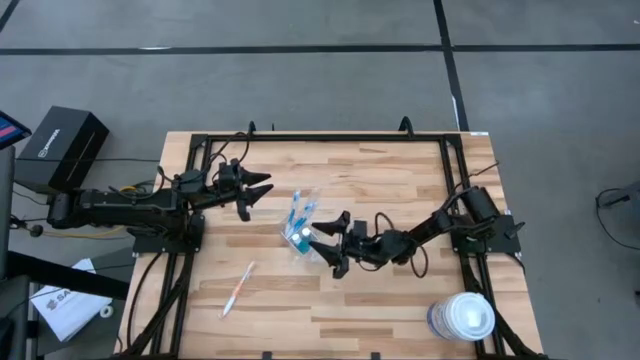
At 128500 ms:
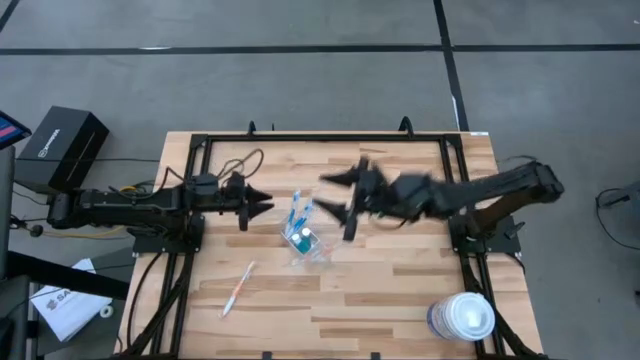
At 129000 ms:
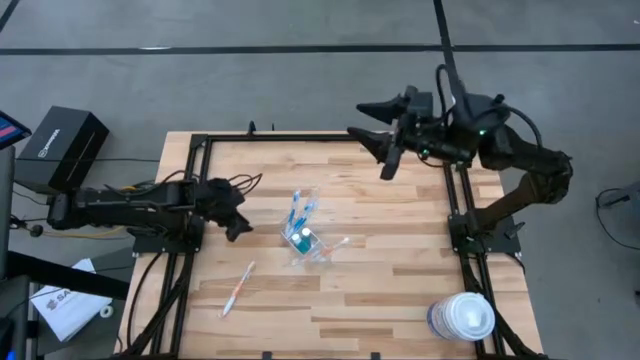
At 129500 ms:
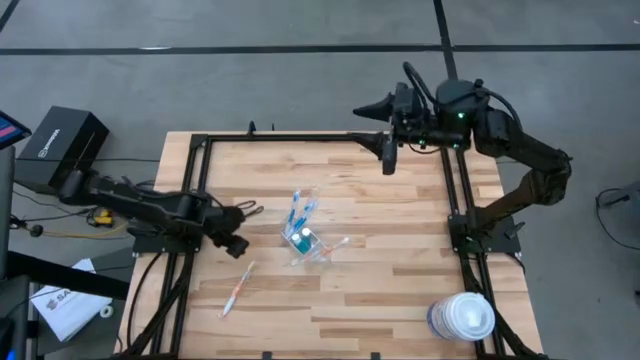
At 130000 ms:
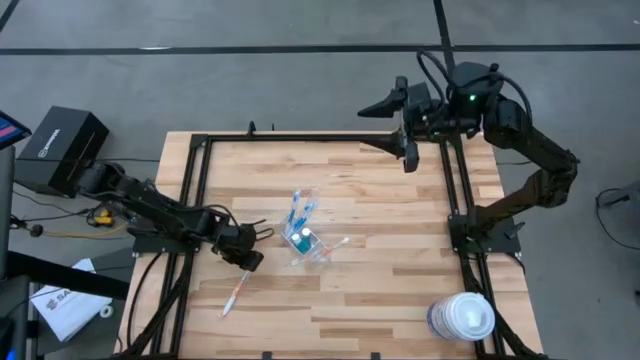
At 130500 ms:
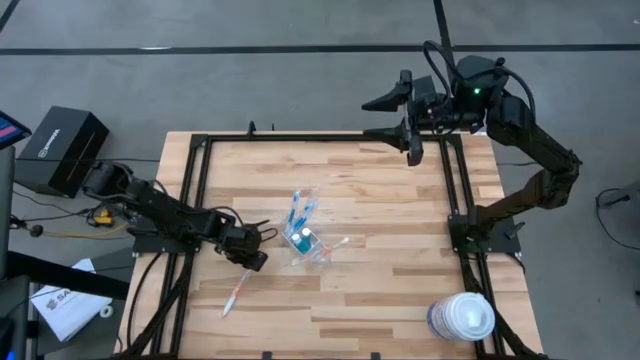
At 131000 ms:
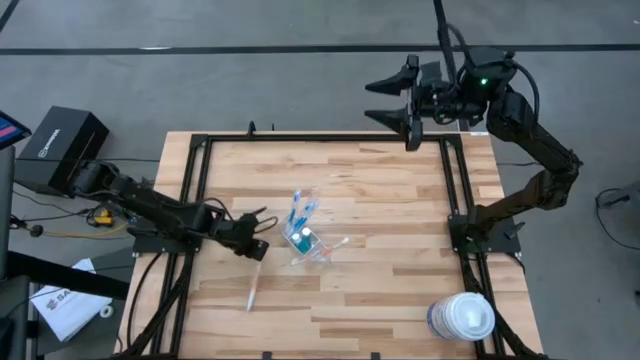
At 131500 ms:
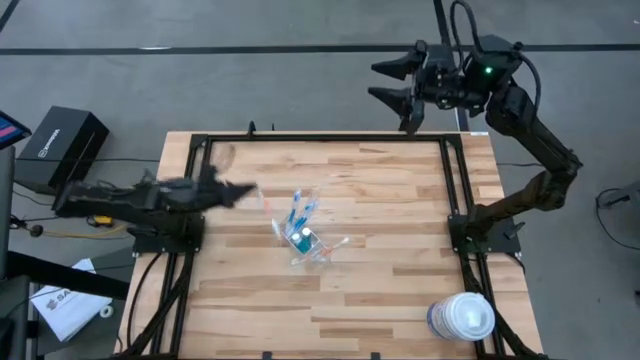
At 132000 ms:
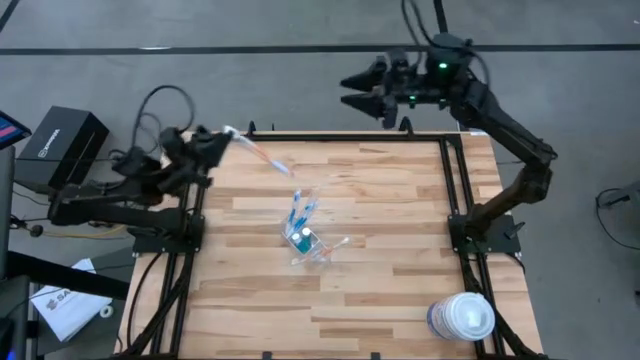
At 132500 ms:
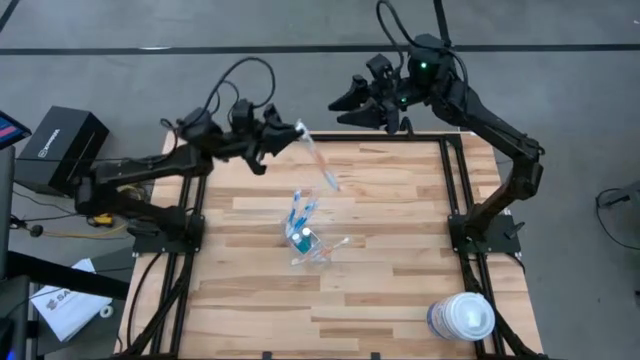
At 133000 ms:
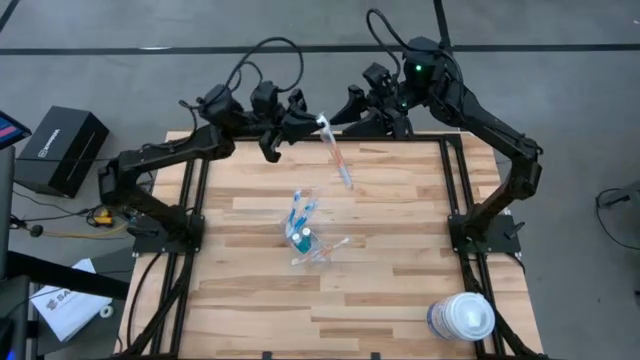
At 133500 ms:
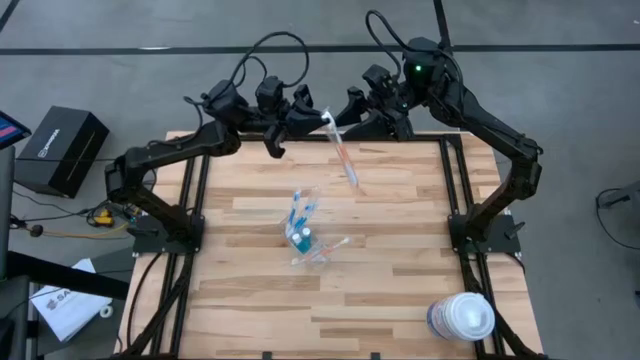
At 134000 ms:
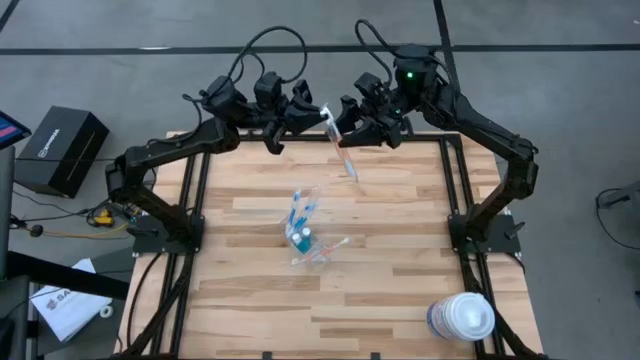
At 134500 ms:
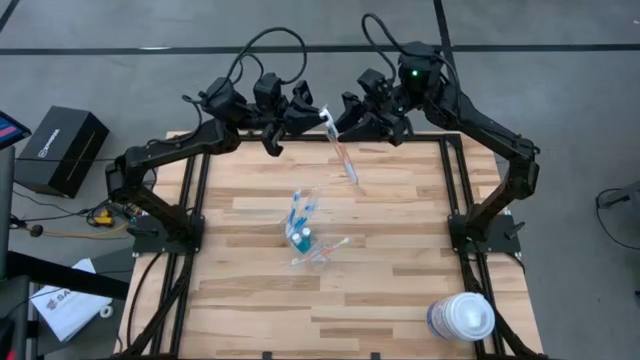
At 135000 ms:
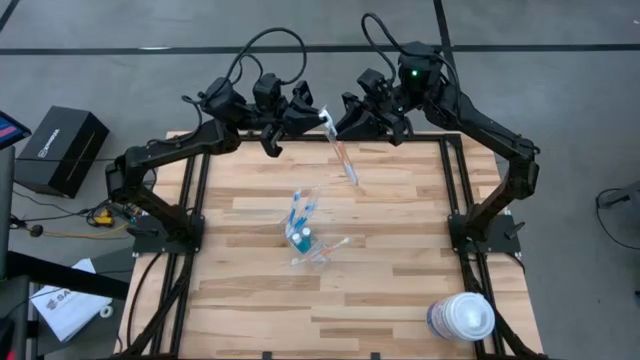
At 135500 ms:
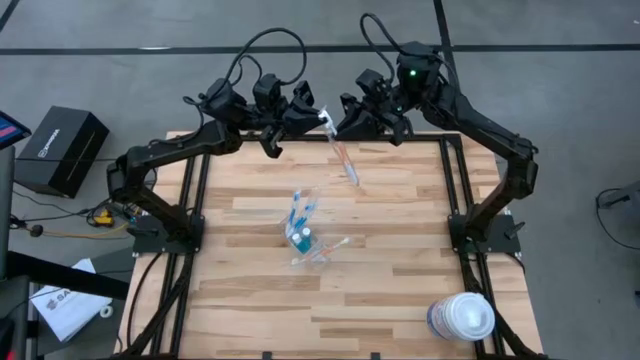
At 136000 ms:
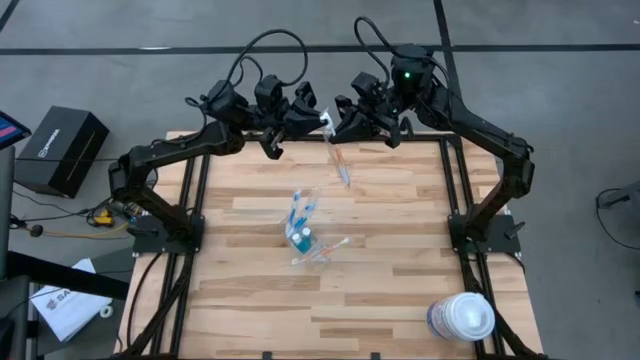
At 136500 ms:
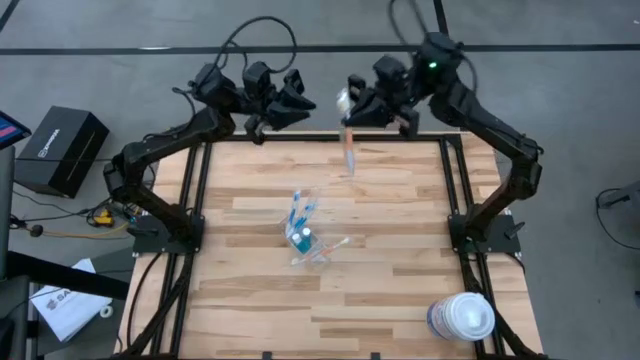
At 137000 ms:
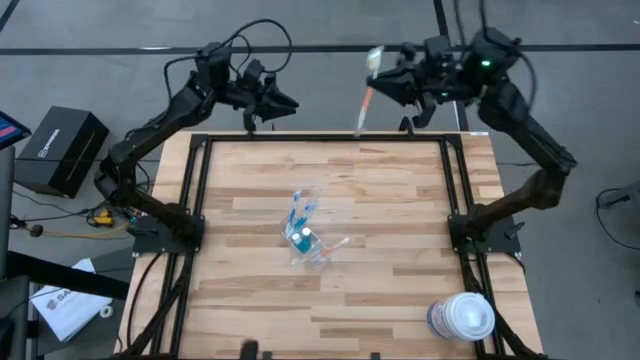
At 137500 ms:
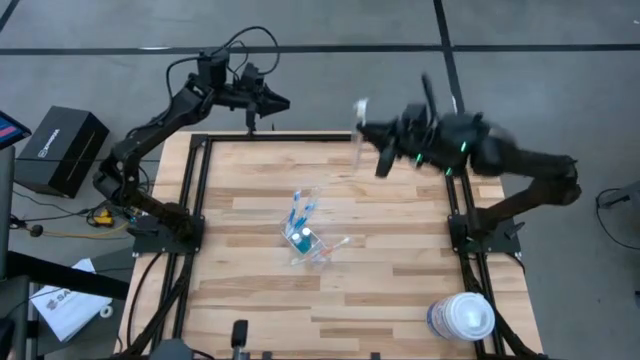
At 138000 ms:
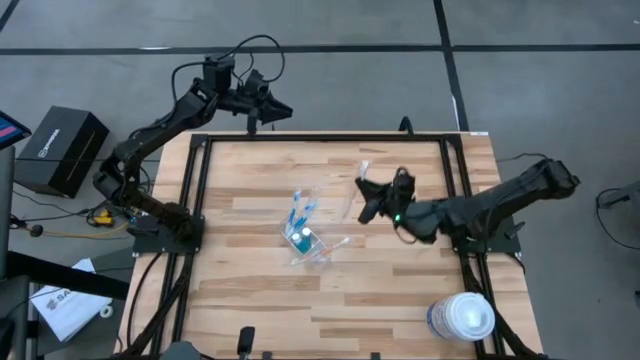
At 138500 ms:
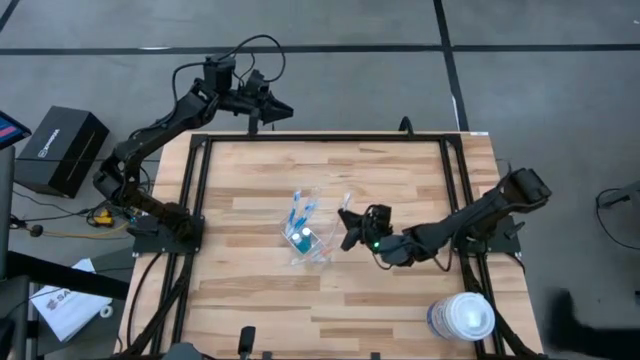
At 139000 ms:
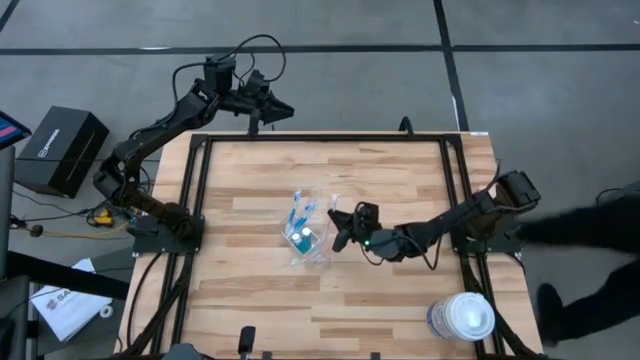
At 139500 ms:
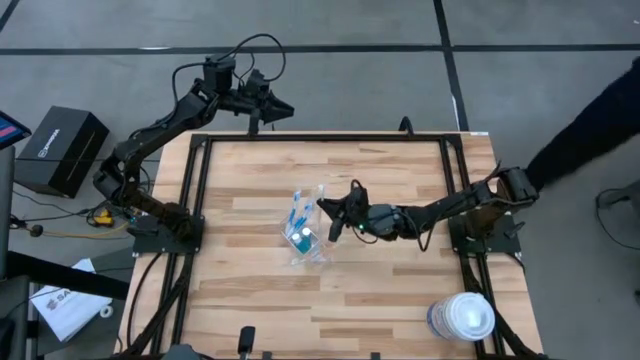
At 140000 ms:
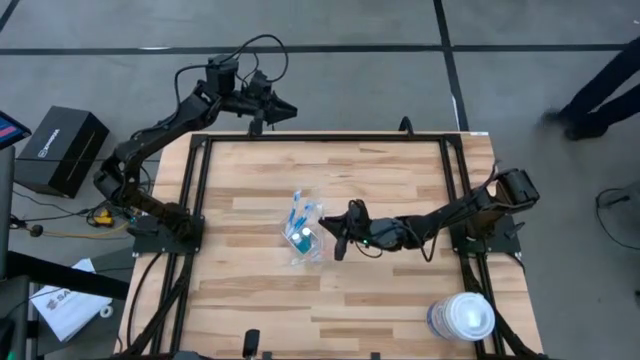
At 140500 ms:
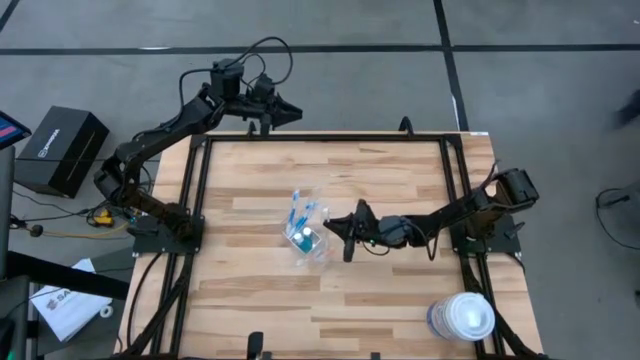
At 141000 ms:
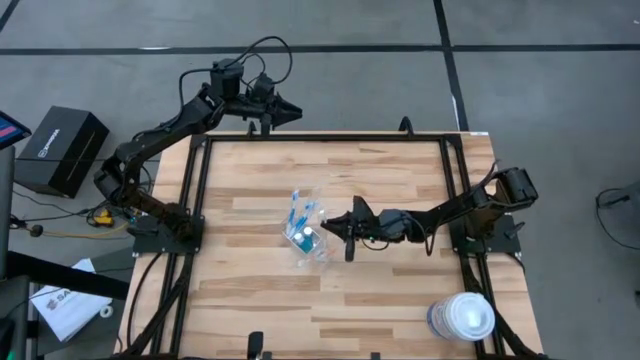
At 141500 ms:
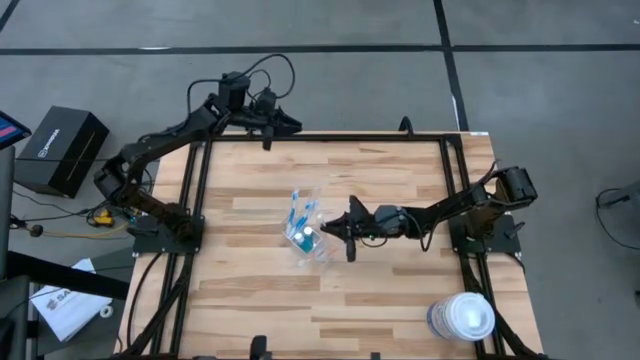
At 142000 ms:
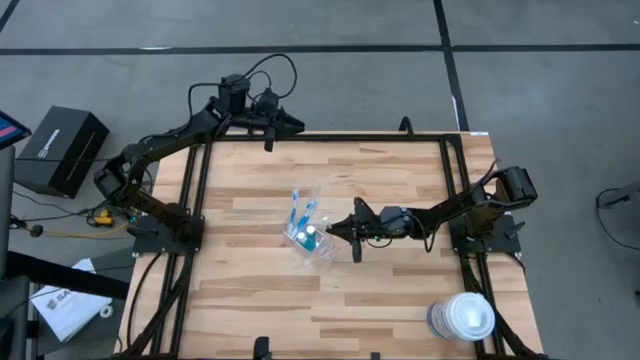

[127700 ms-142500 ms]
Task: Pick & Place toothbrushing station
Put the orange toothbrush into the transparent organizer

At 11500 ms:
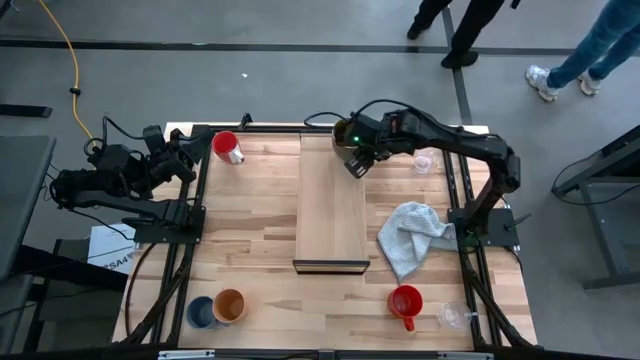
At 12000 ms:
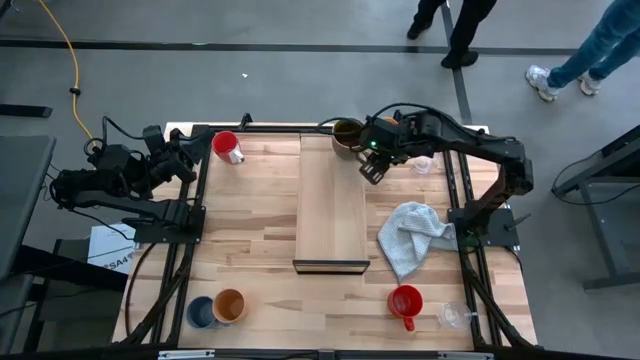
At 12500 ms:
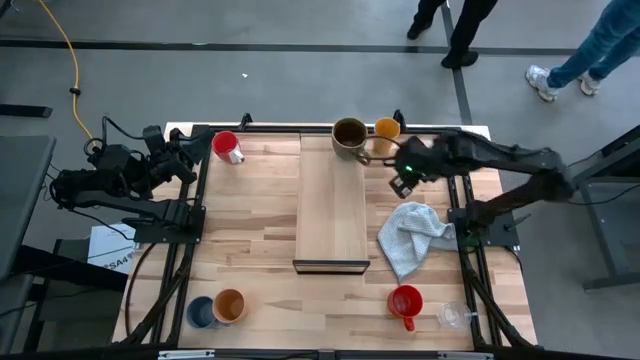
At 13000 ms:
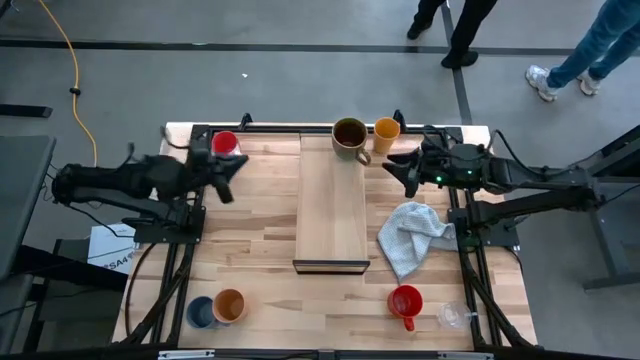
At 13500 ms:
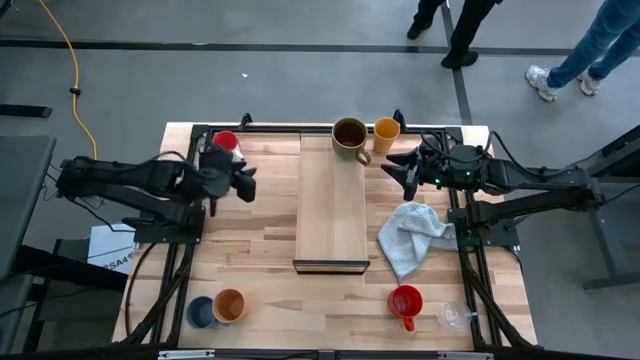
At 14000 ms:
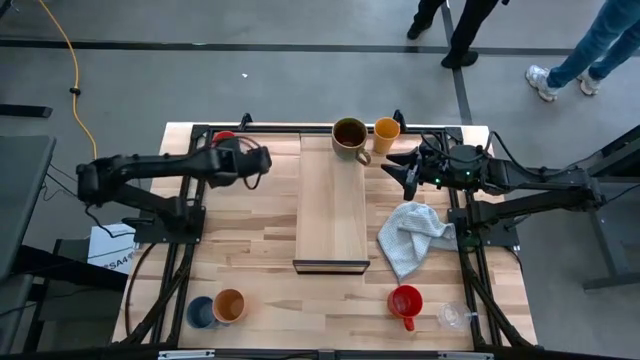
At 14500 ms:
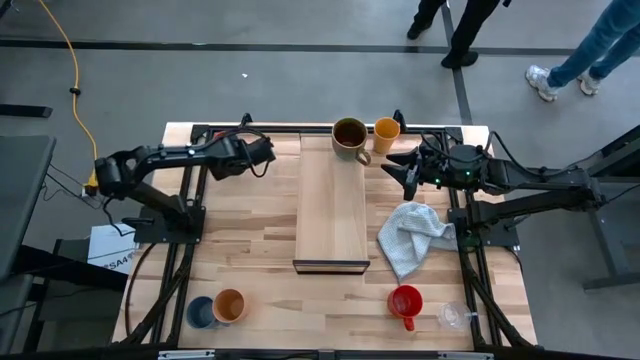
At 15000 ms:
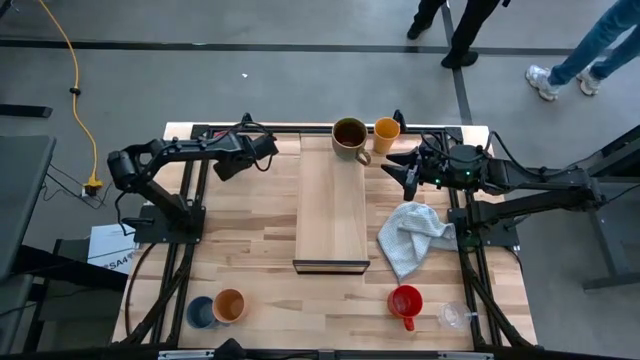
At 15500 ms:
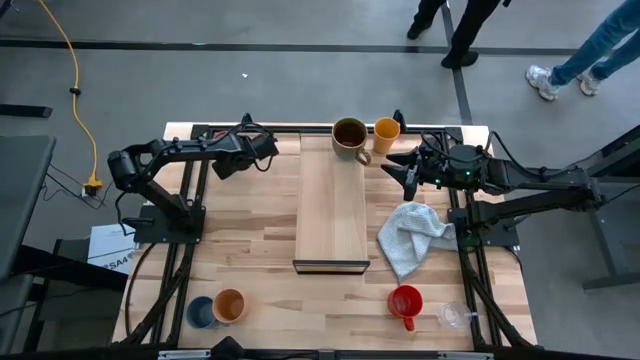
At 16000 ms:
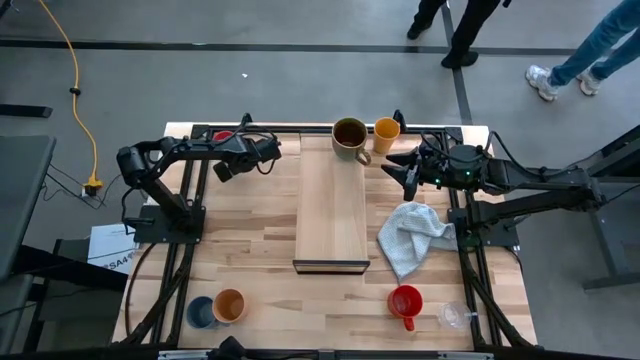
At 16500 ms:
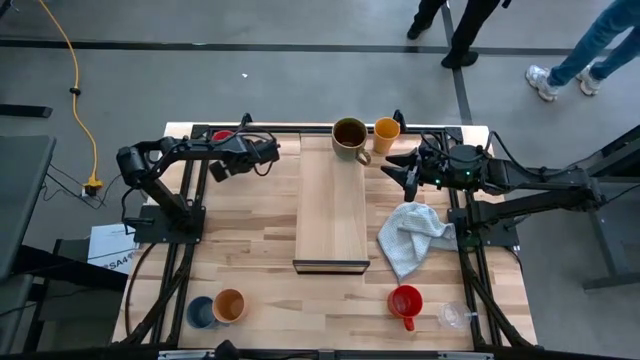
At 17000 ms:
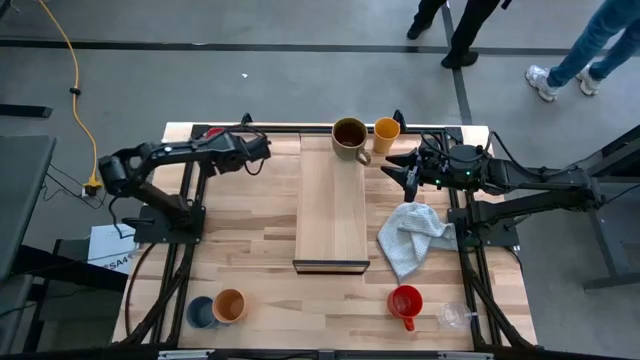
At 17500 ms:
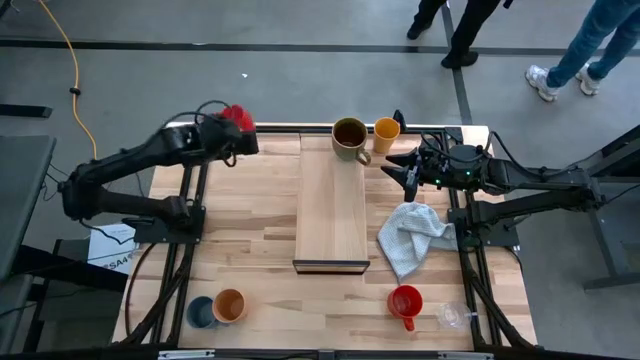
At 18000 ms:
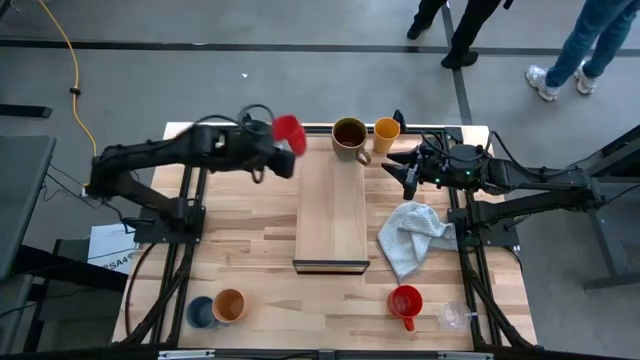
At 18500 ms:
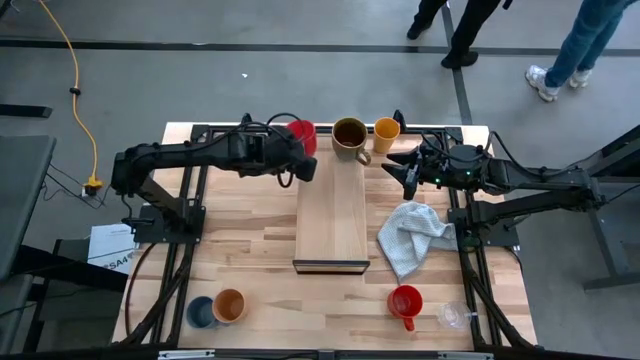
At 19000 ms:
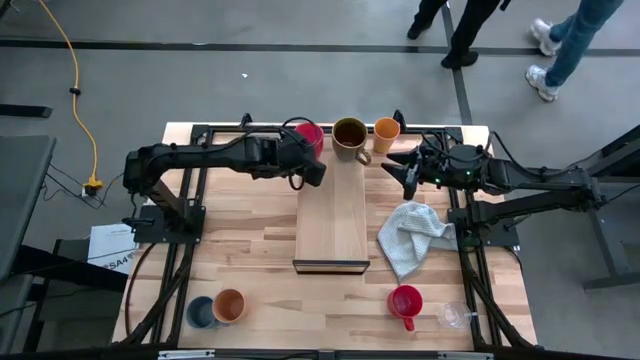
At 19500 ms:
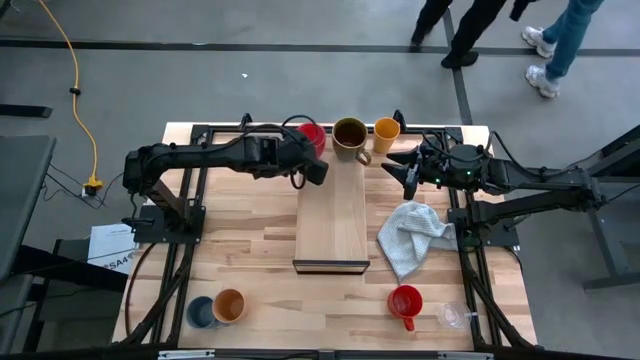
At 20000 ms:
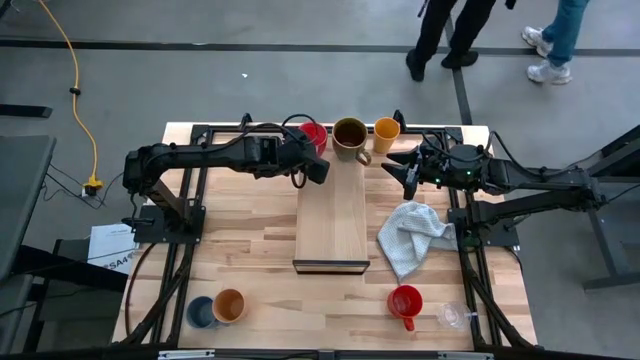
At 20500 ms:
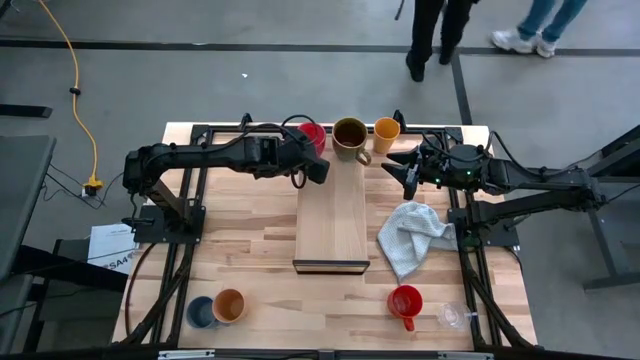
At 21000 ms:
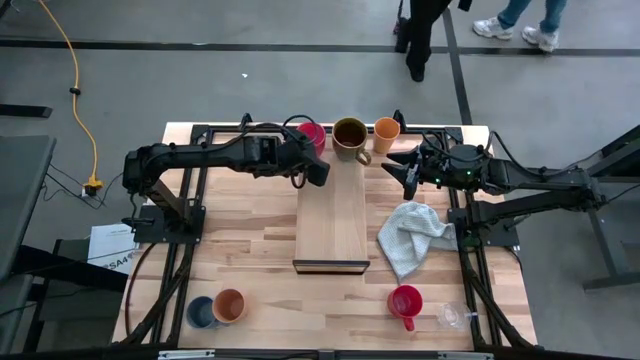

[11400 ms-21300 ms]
Task: Stack small to large cups/mugs on shelf
Put the red patterned mug on the shelf
